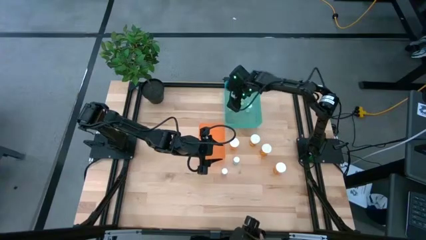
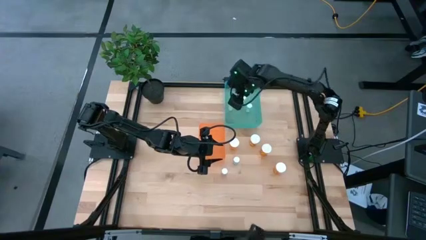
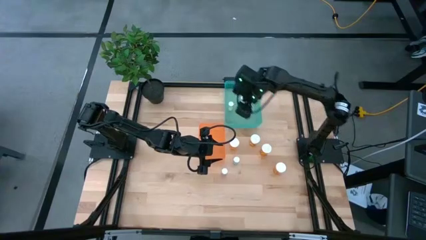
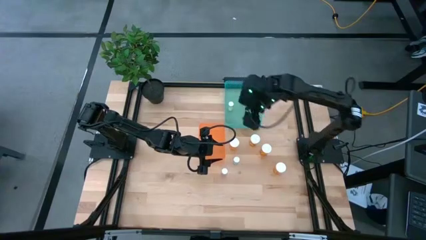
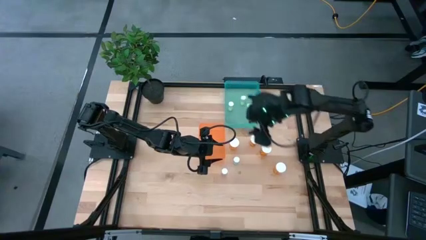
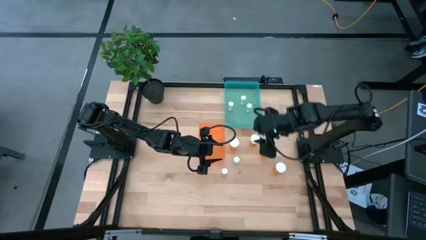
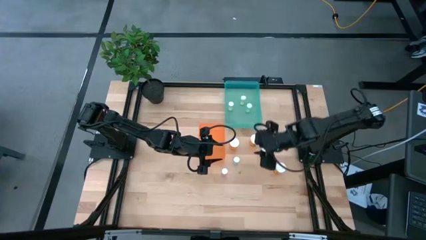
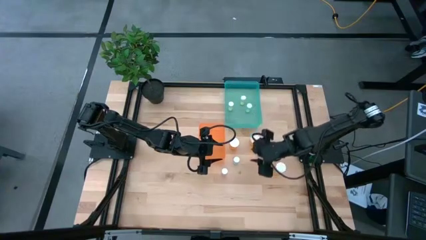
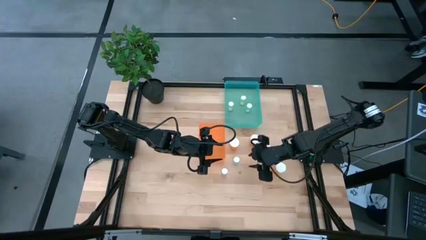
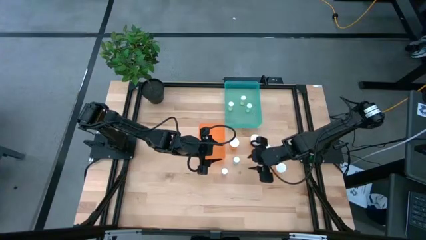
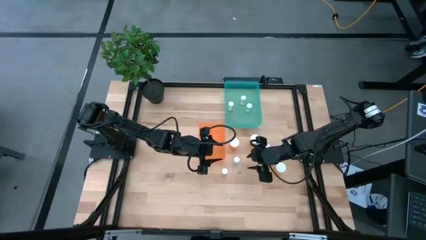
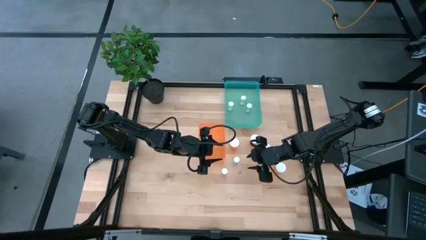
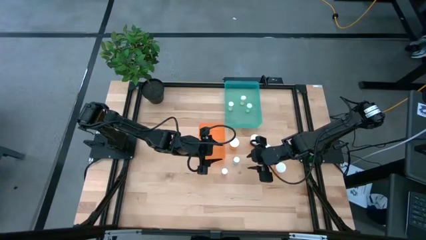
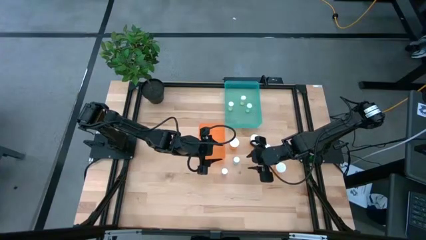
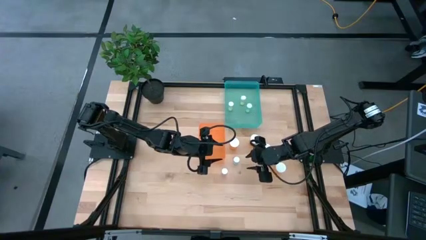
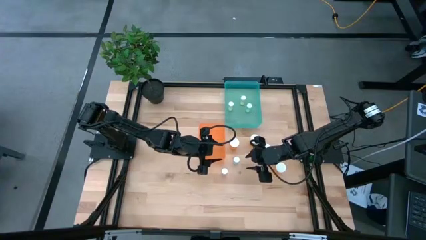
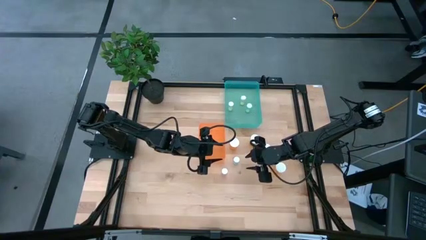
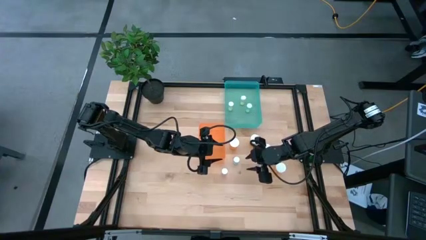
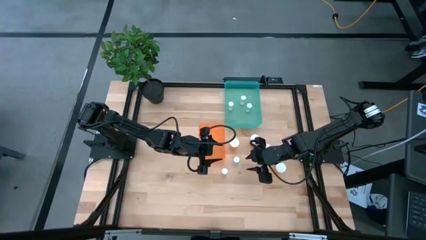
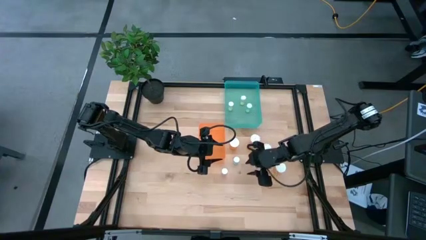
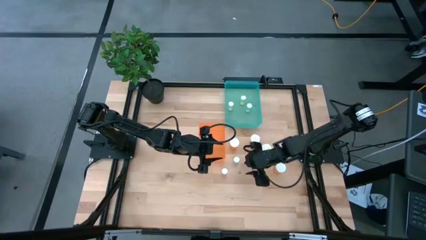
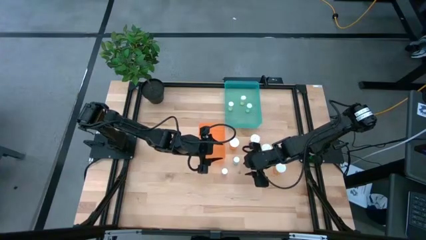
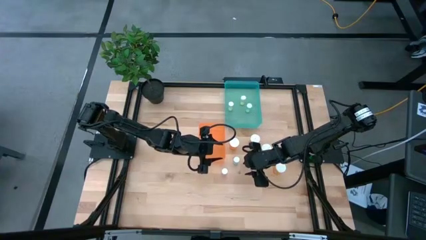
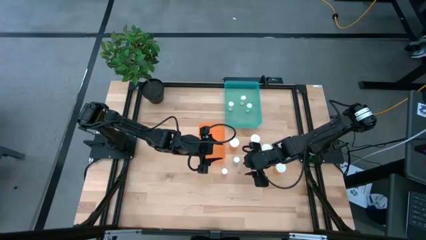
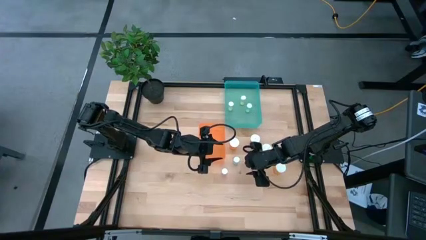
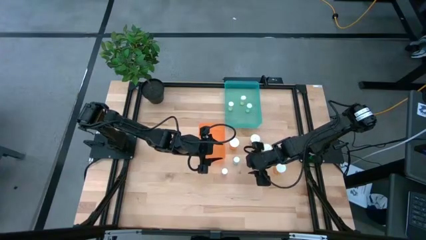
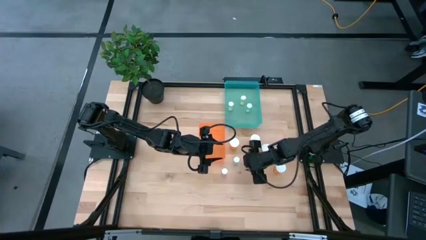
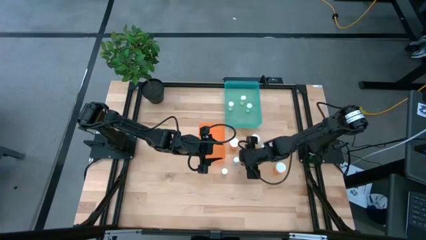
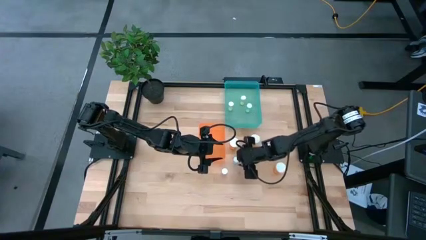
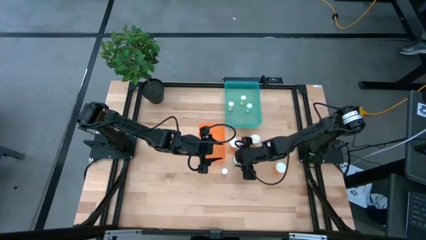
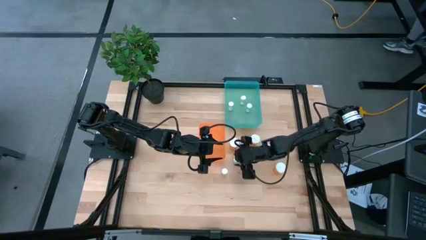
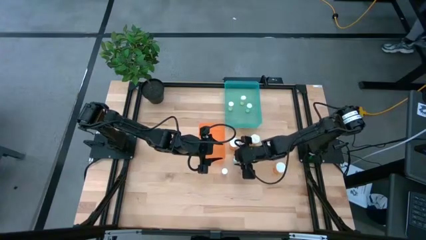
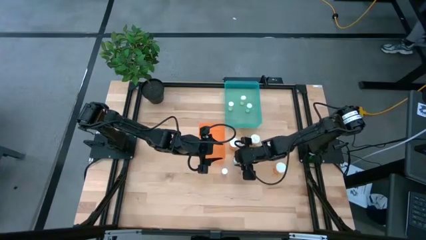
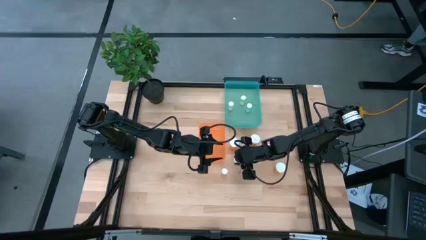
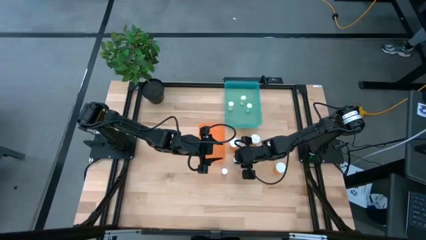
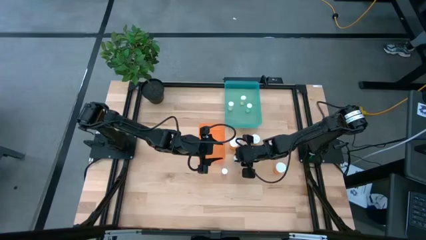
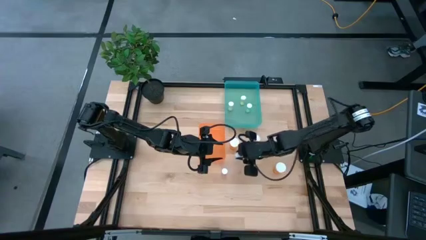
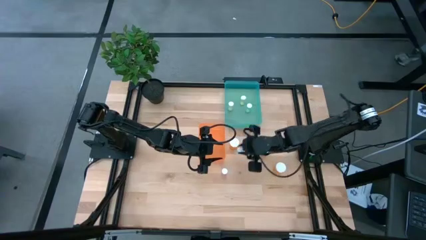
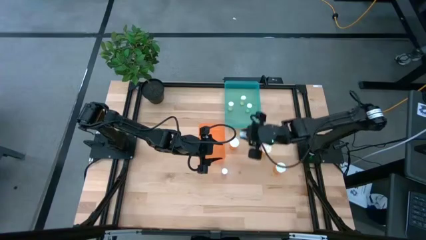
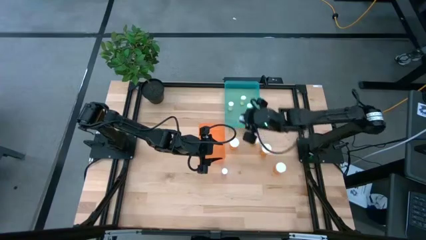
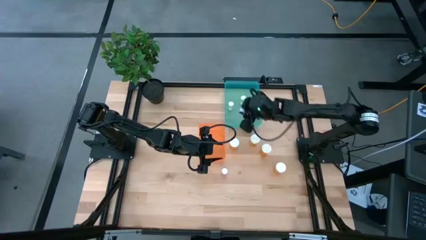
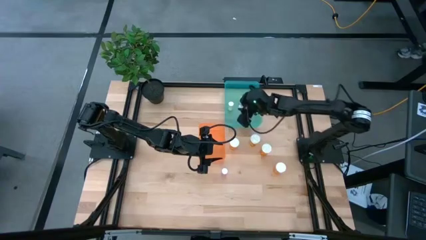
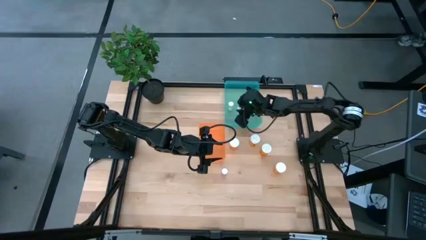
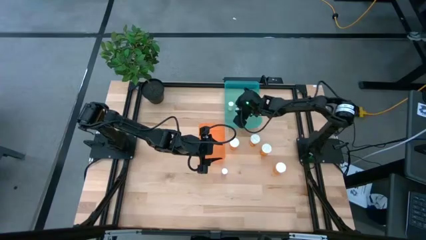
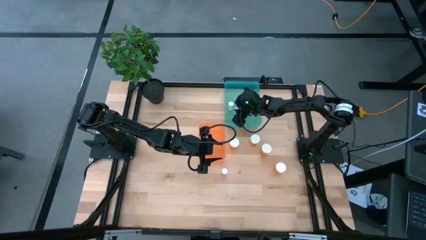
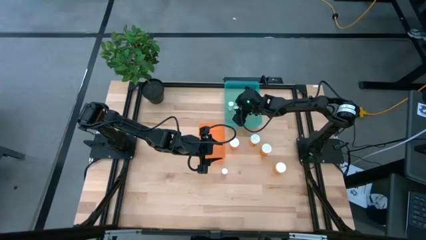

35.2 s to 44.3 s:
Task: Pick and place medicine bottles into bin by pill shape (circle, oval)
Put the blue tablet bottle into the green bin

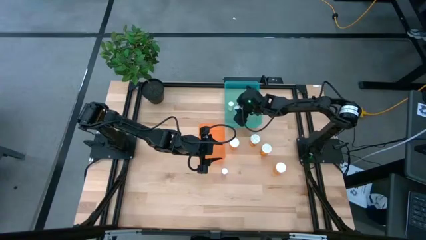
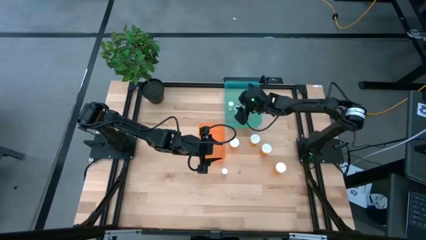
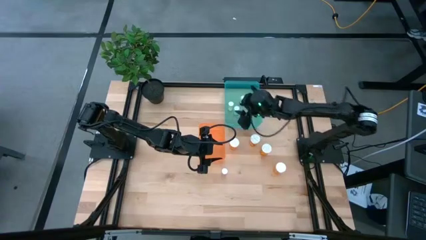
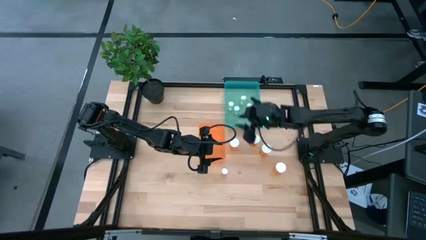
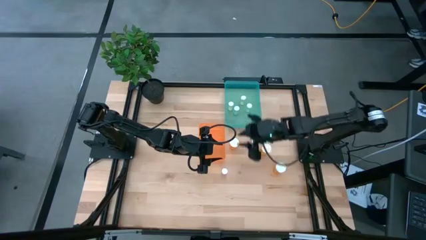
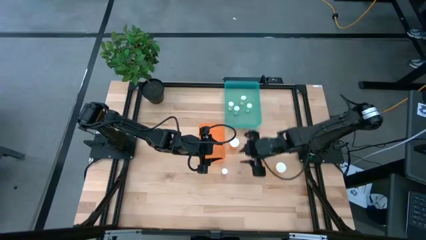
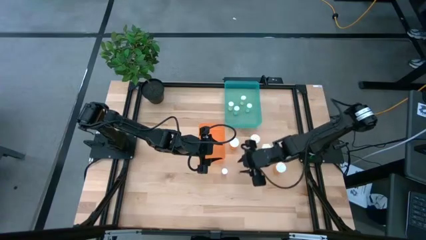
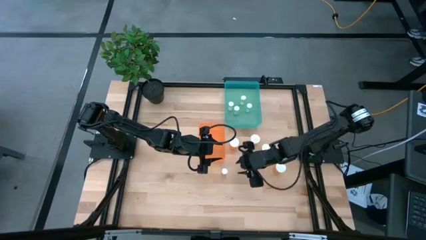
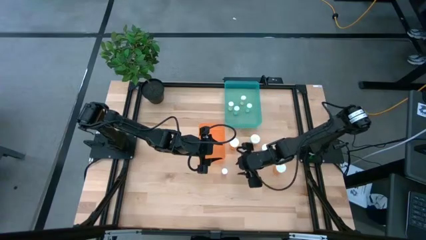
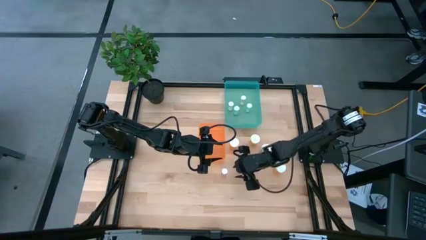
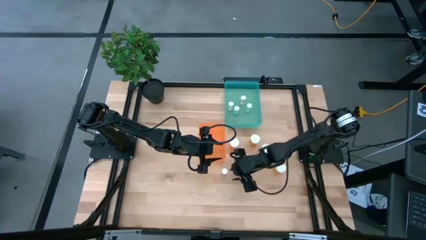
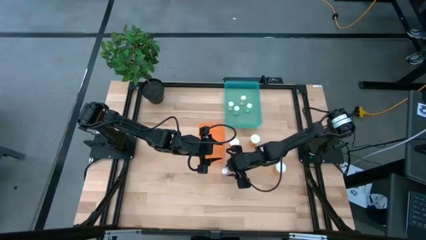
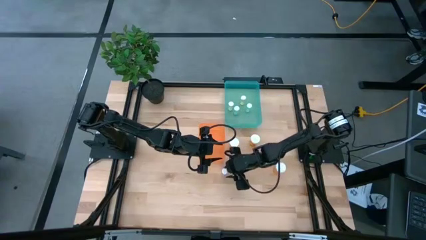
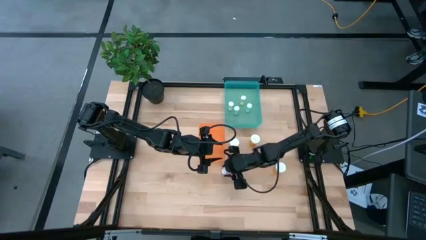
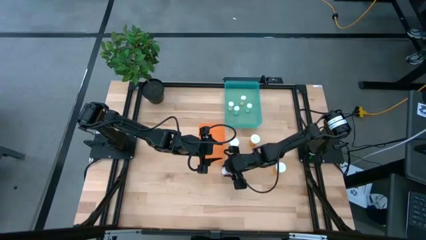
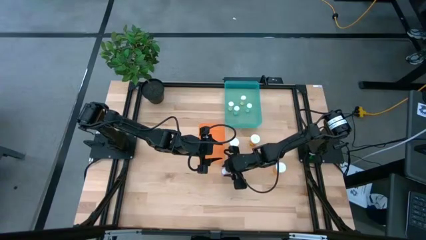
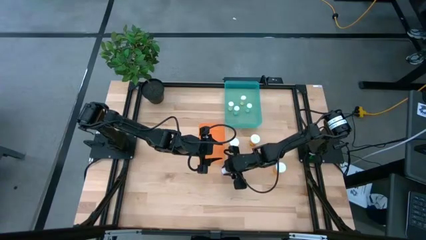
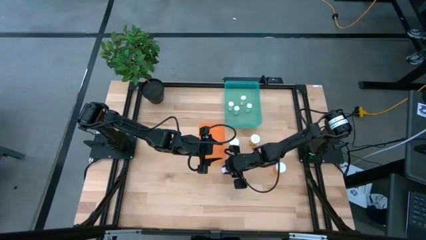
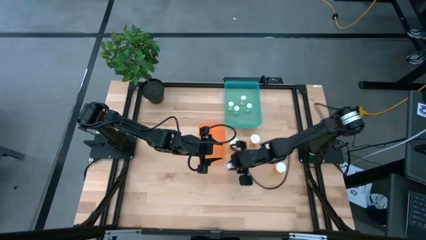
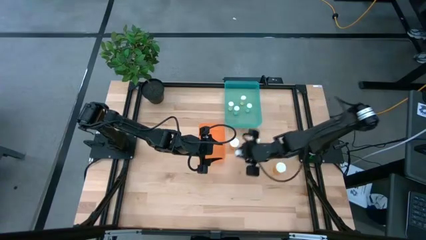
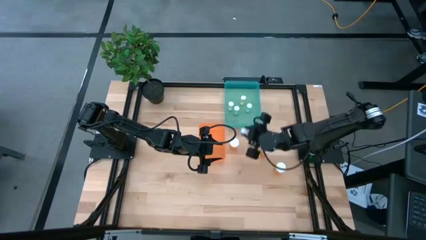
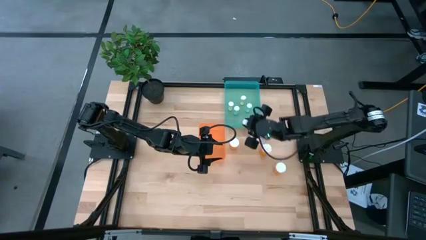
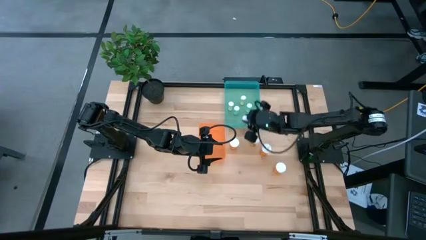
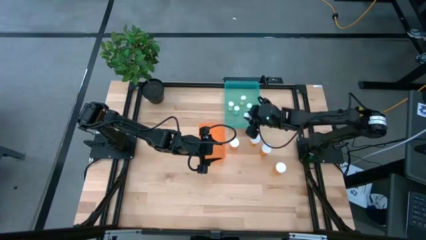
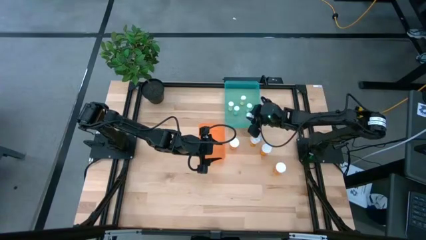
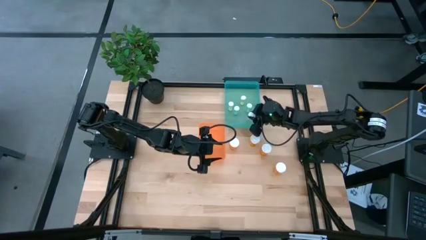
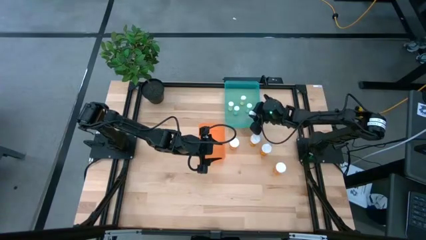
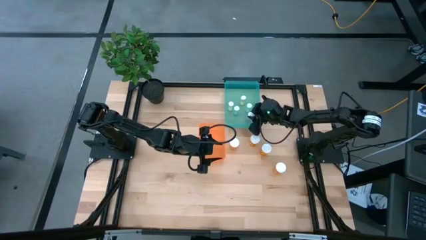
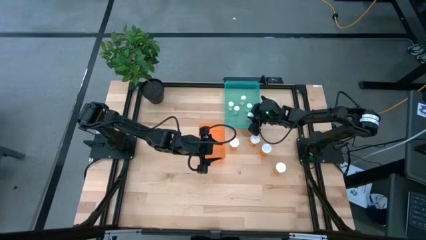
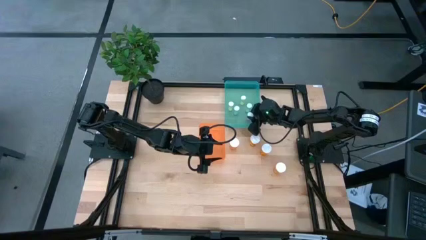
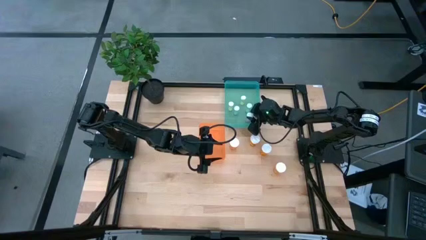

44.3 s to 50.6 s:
Put the pink tablet bottle into the green bin
